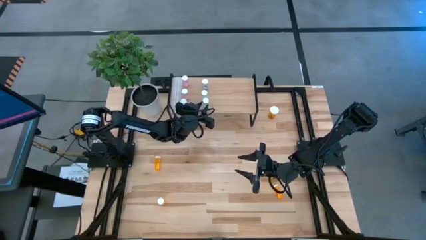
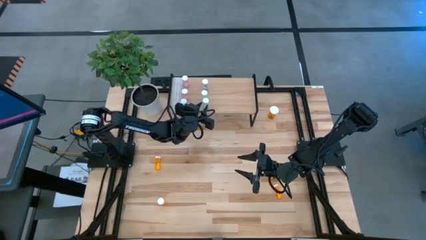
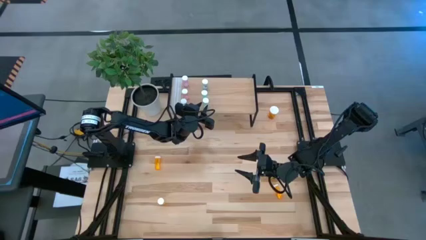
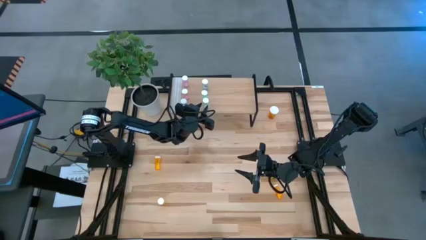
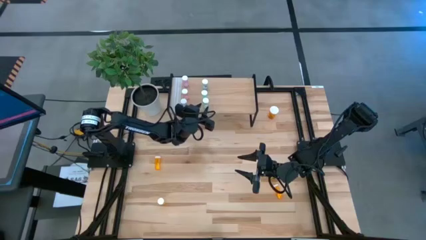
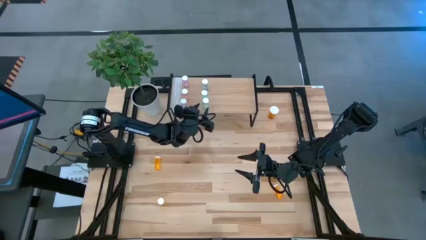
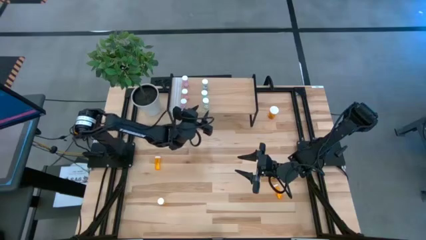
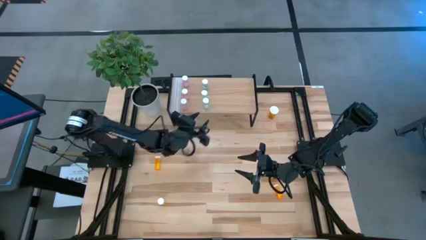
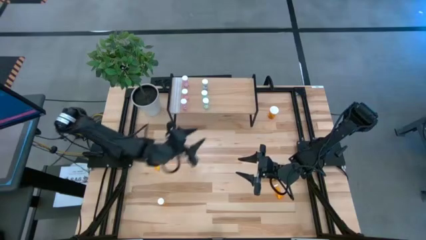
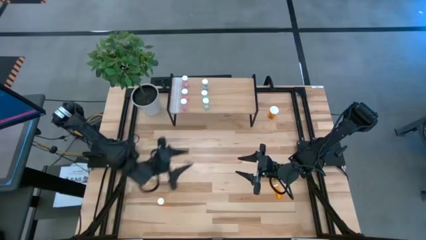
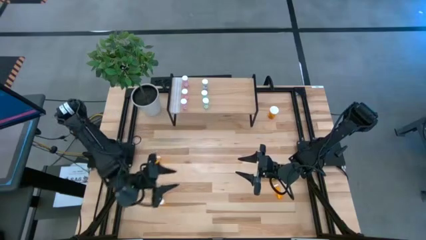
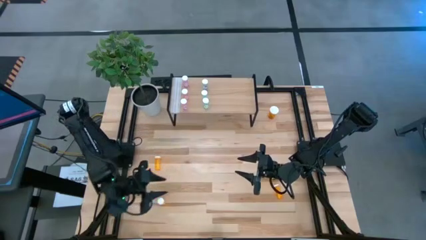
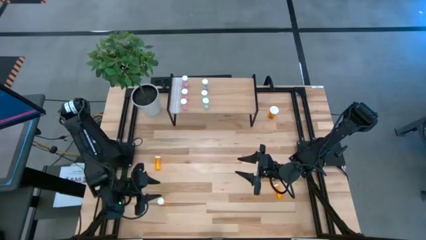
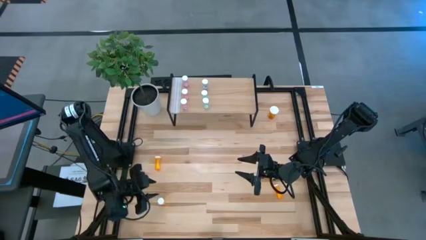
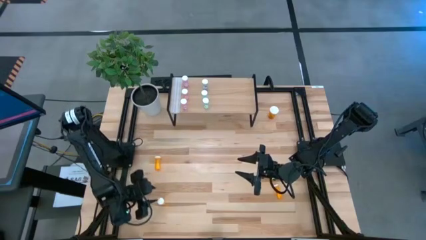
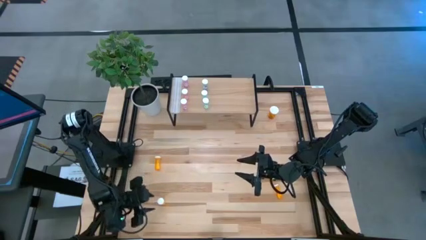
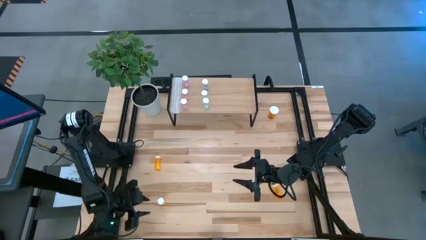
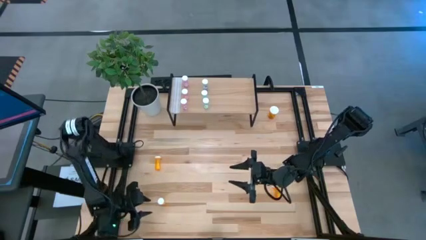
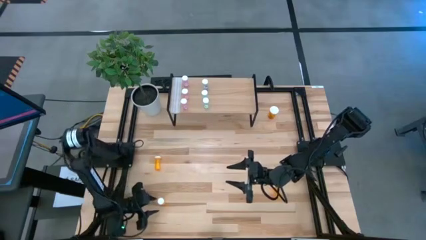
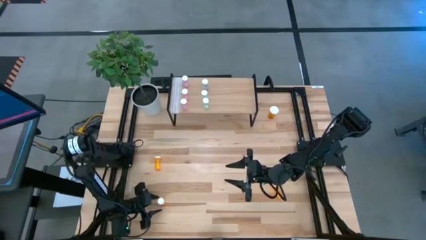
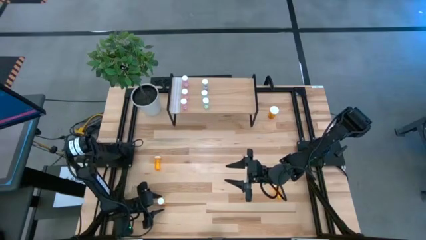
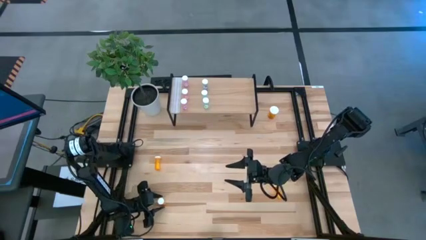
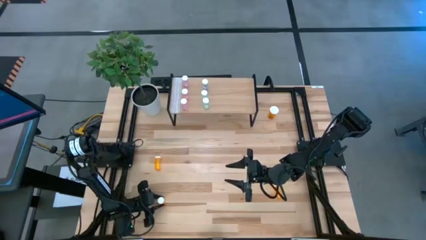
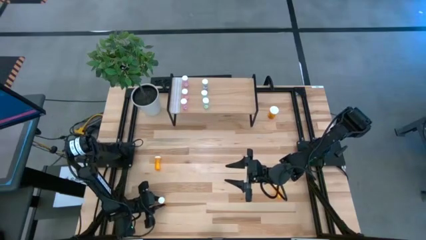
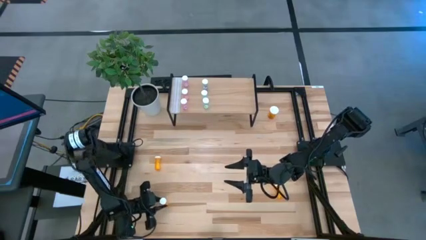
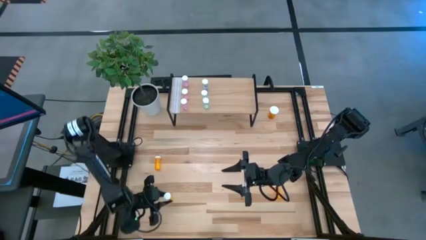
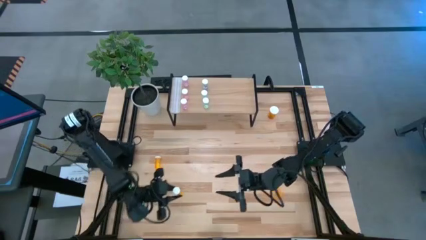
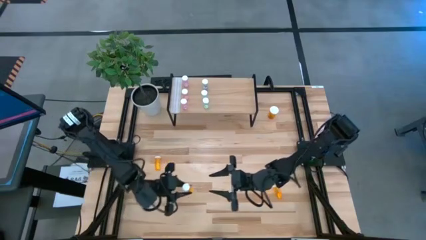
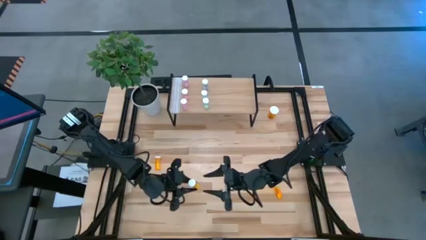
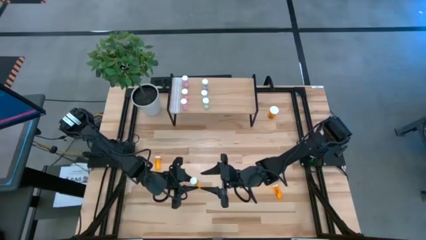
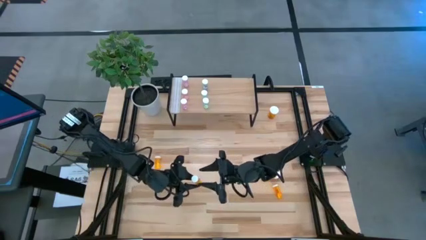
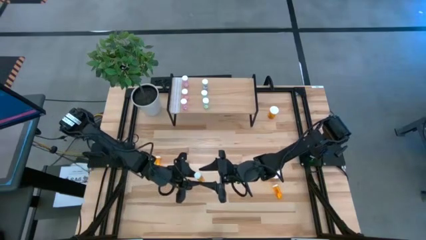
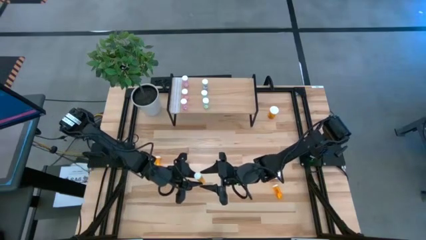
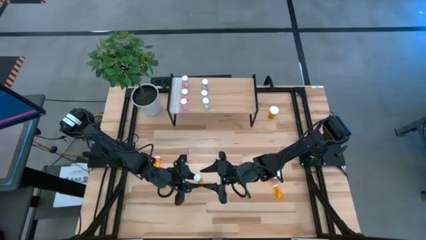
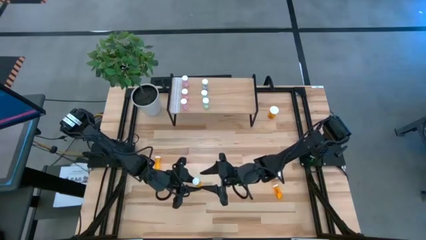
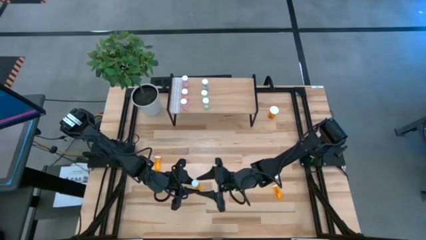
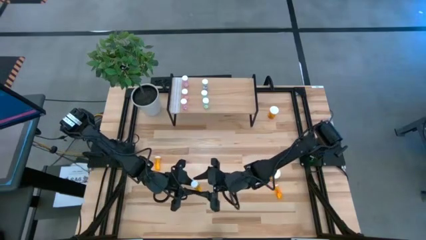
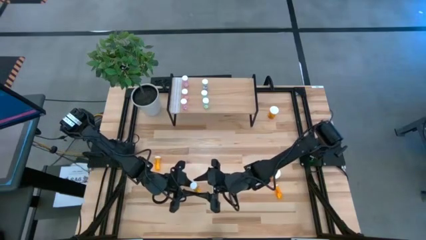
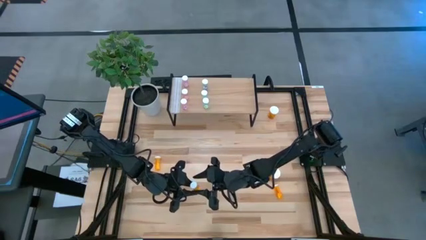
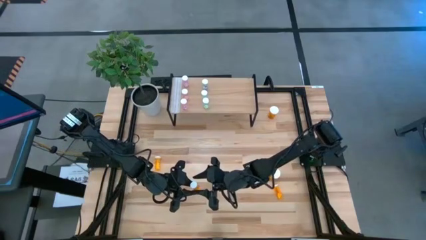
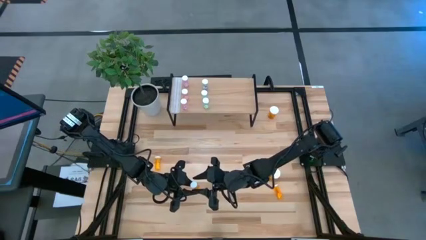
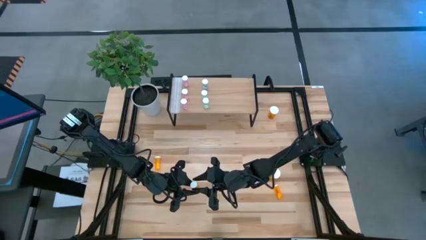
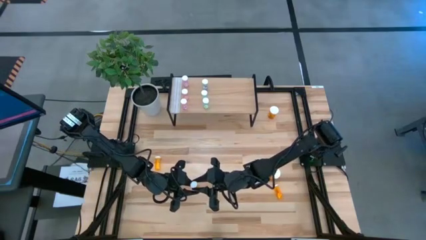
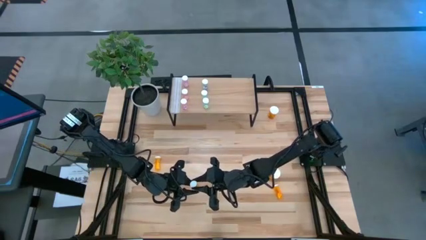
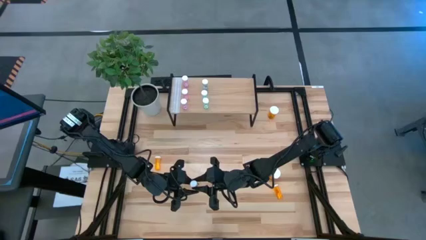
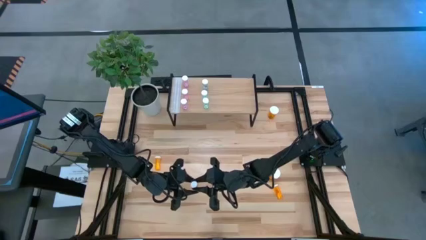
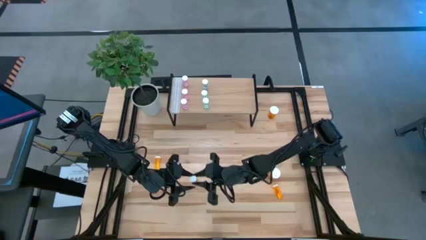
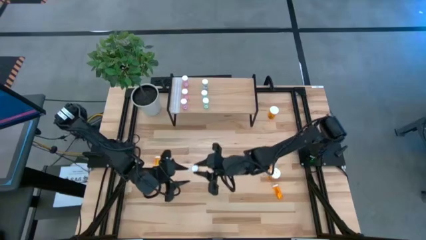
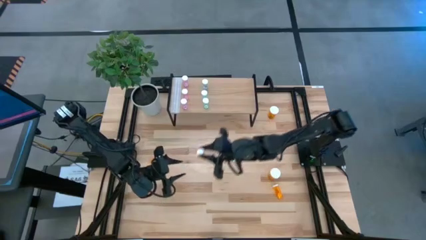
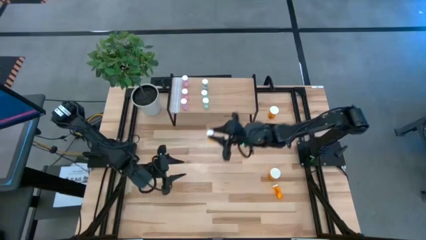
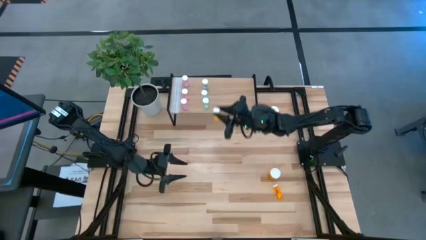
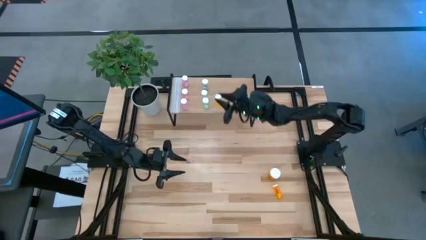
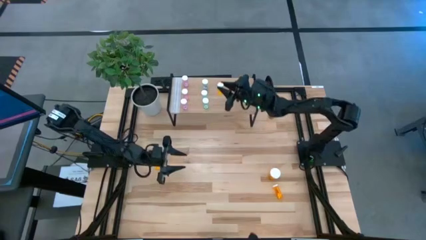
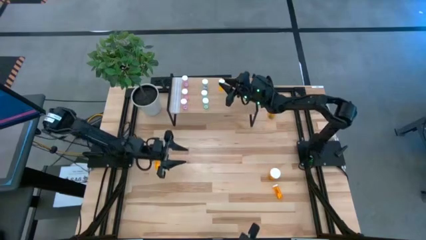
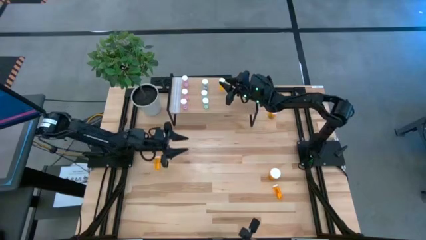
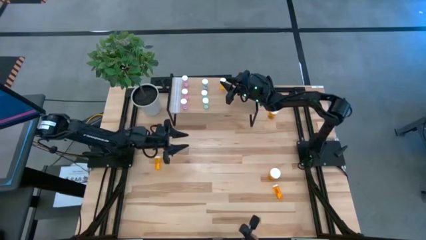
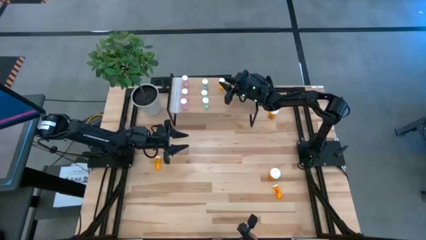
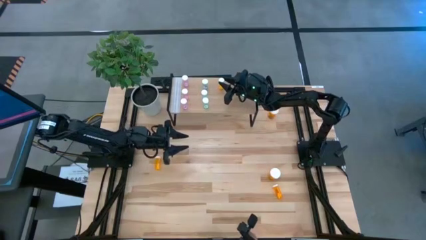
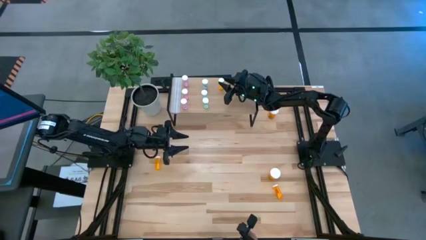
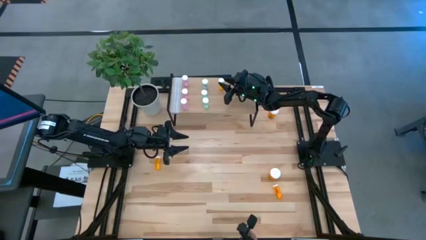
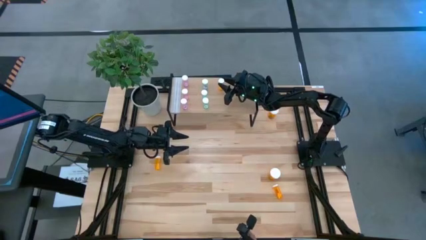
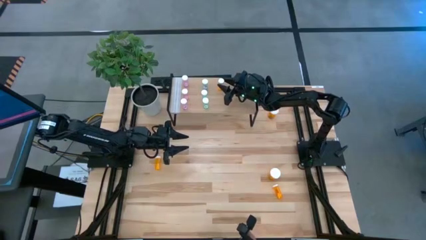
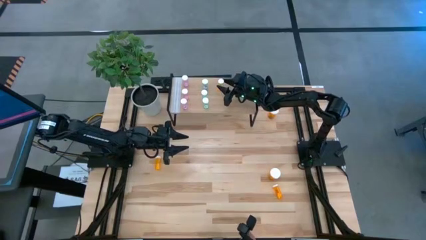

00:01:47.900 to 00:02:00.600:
Task: Pick and place medicine bottles onto shelf by color
Put the bottom left small orange pill bottle on the shelf
